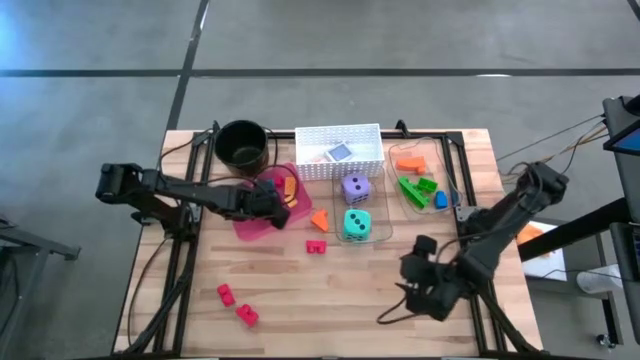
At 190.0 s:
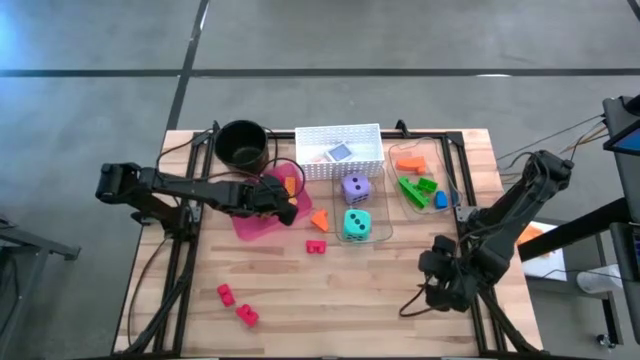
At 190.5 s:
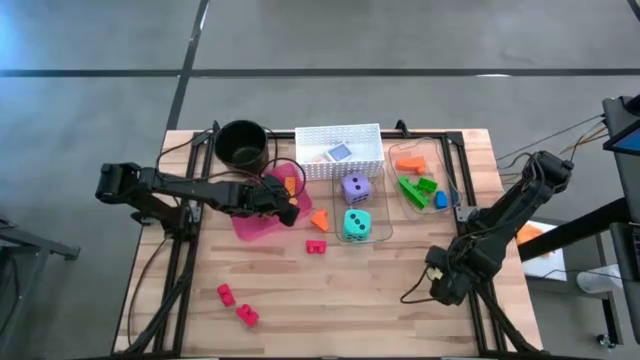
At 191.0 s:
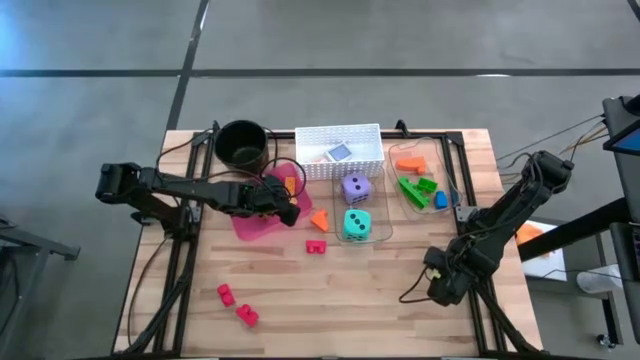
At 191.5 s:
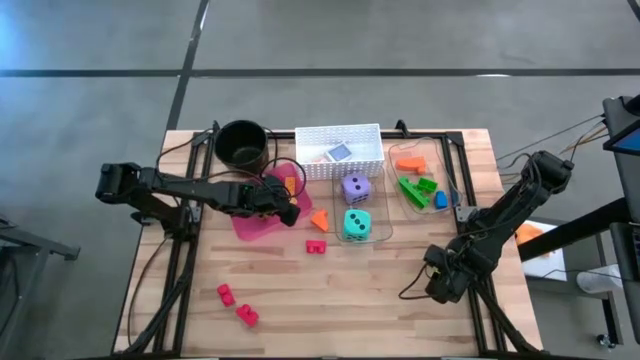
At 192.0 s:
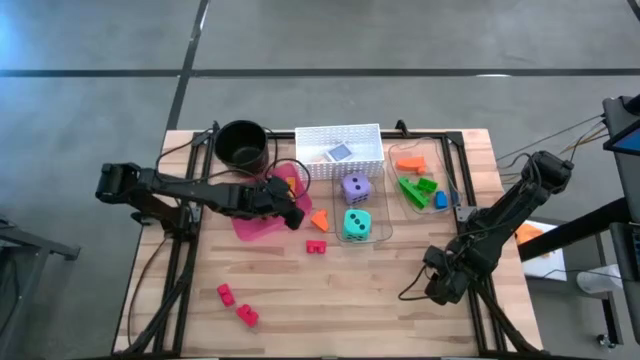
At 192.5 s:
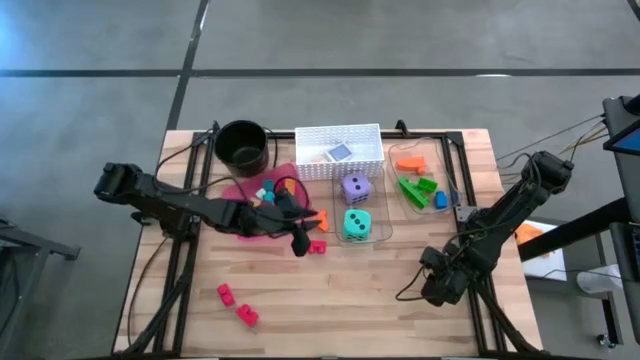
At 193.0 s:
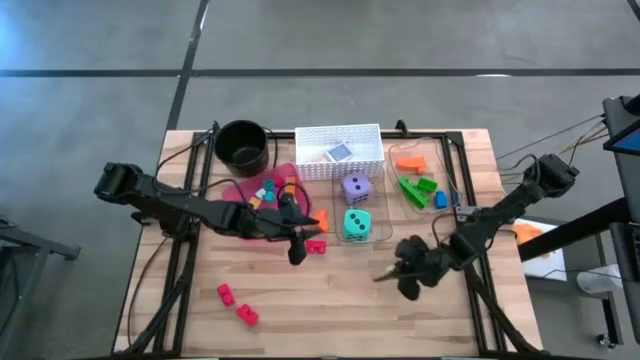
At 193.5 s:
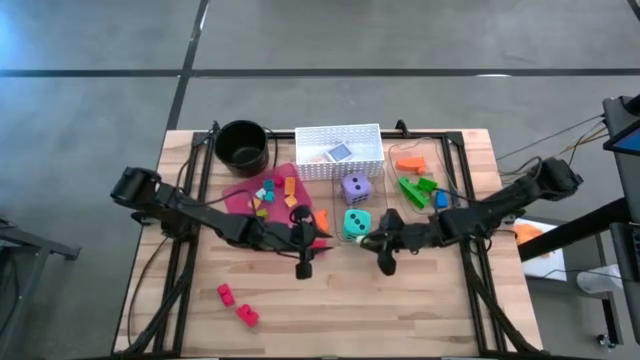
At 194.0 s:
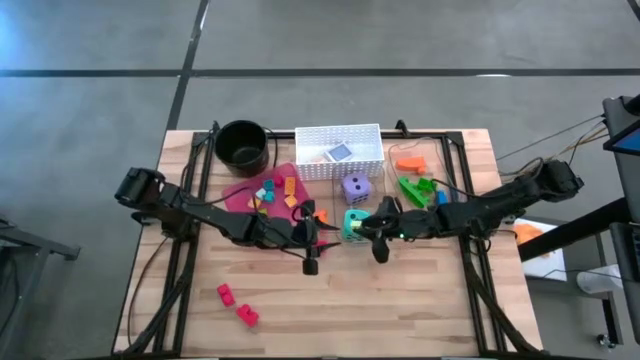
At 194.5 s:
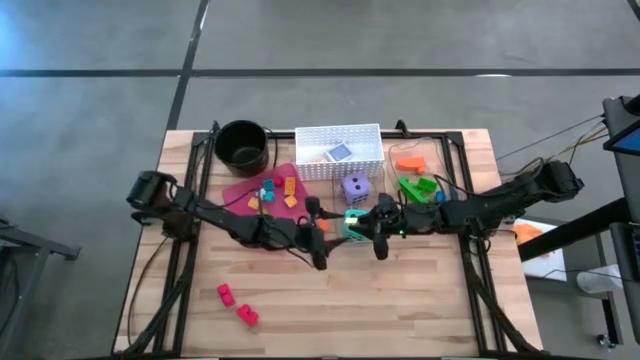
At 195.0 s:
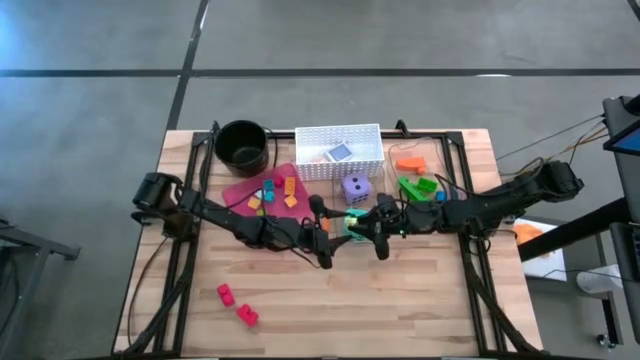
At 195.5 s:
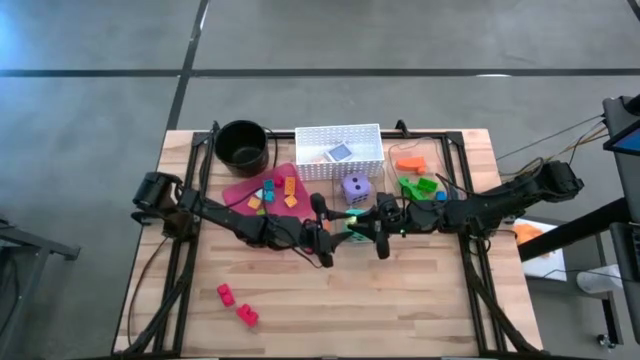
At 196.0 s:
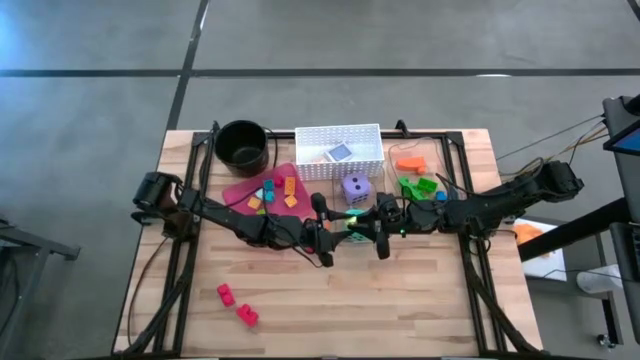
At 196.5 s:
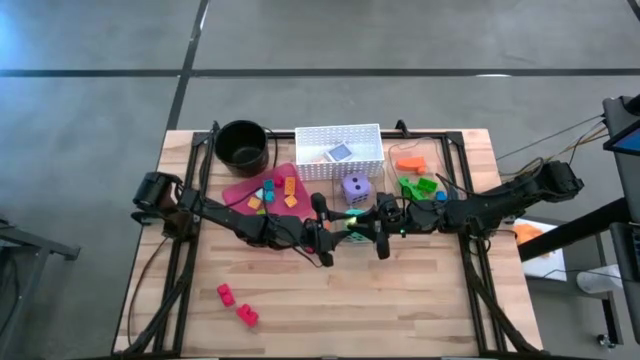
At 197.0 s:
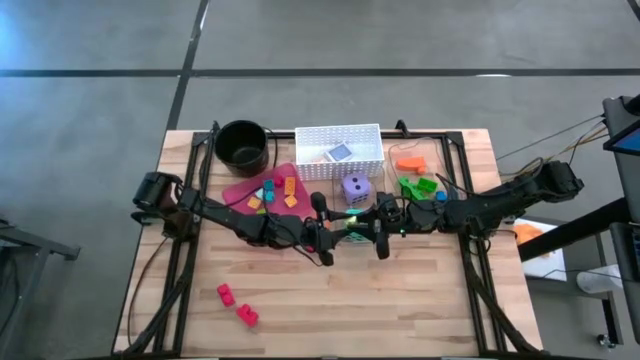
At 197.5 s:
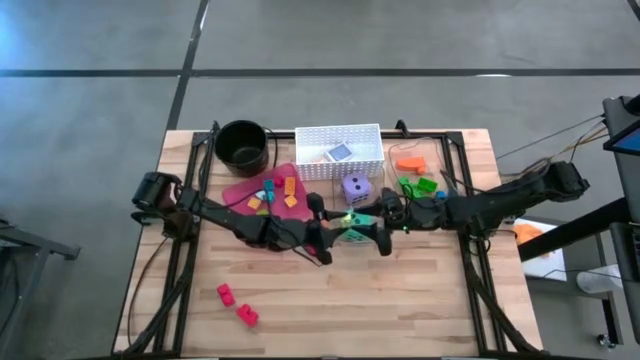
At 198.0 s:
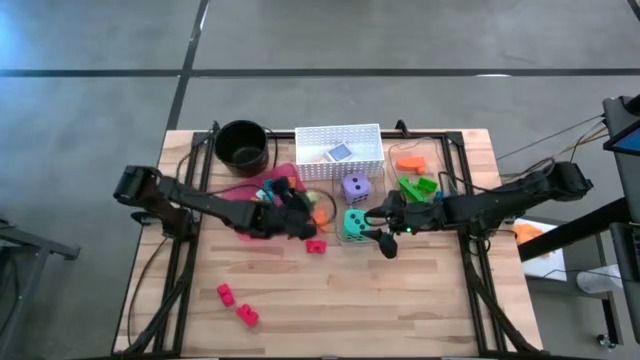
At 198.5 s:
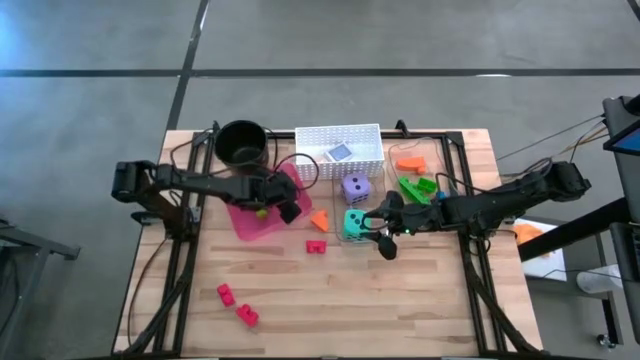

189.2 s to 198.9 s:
Task: Pick & Place Toys
Put the light green game piece into the transparent bin

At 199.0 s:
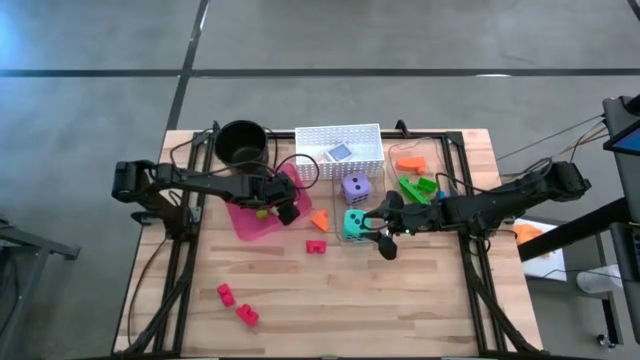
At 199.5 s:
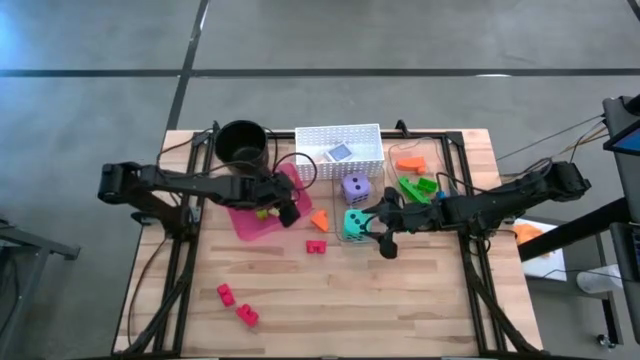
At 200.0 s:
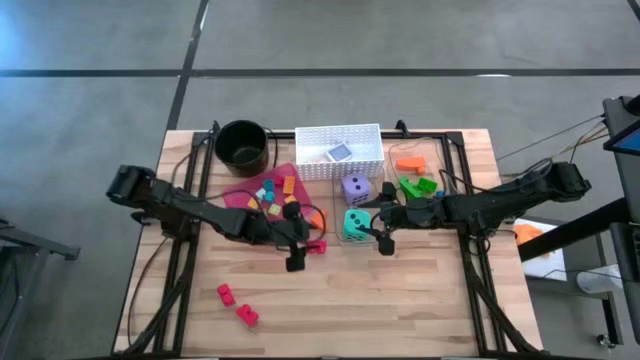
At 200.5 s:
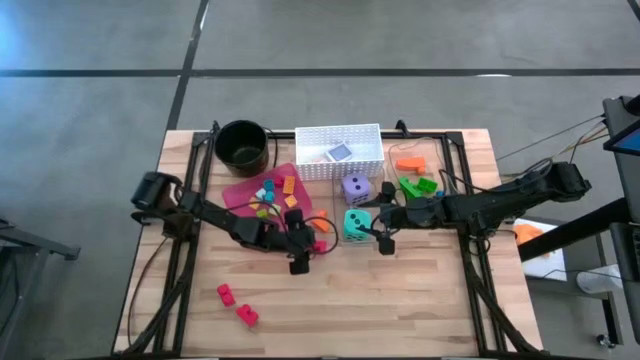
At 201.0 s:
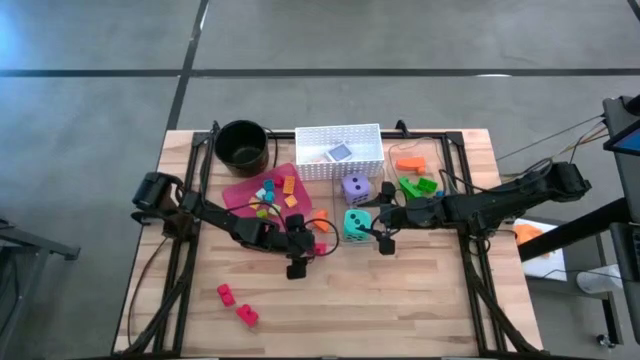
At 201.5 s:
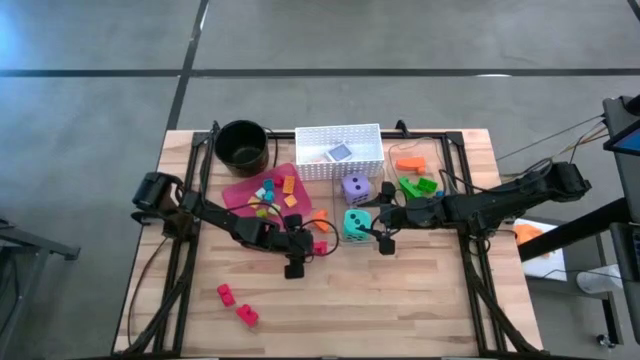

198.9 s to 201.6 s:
Put the top large red game piece into the top transparent bin

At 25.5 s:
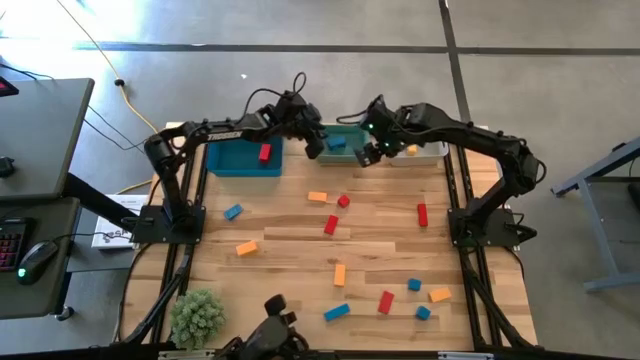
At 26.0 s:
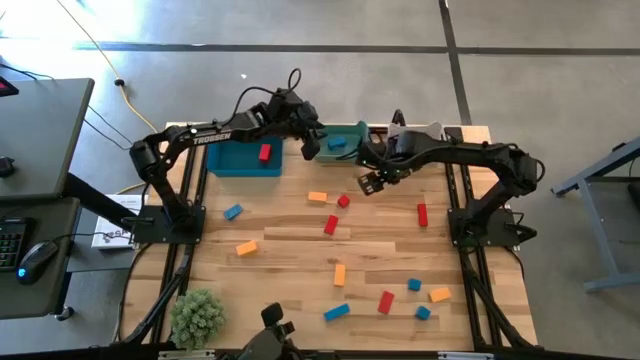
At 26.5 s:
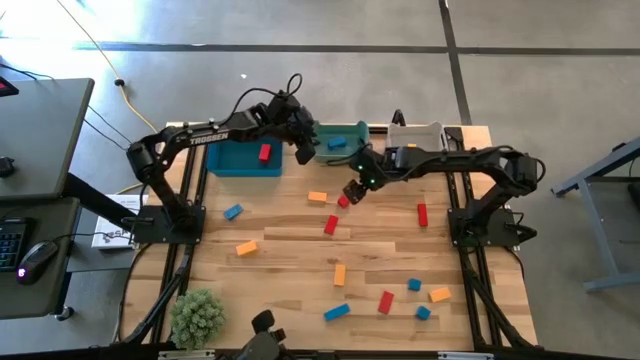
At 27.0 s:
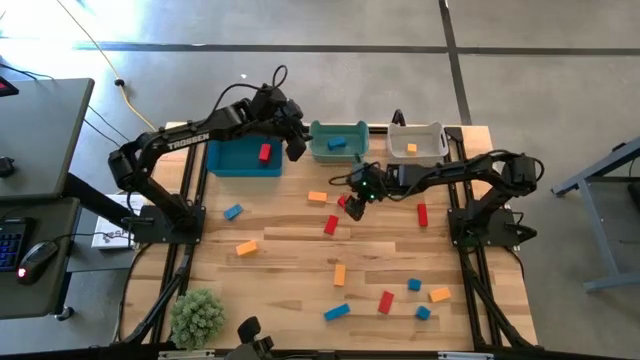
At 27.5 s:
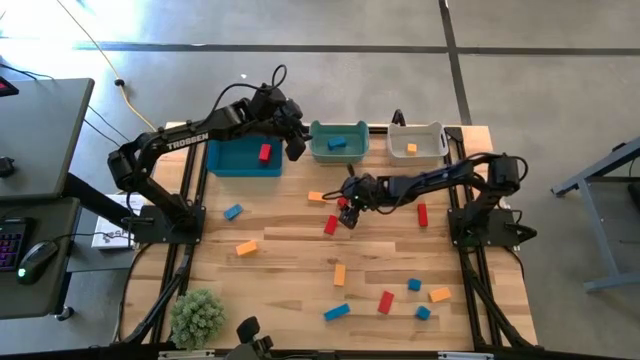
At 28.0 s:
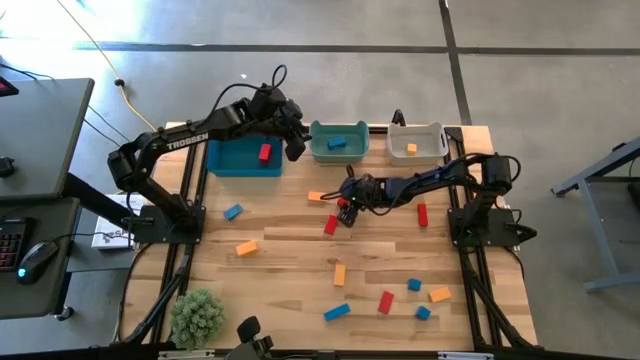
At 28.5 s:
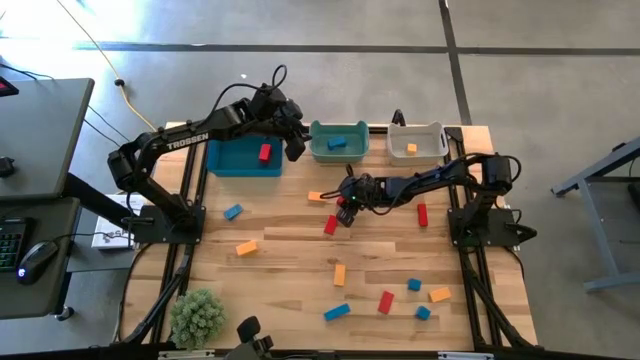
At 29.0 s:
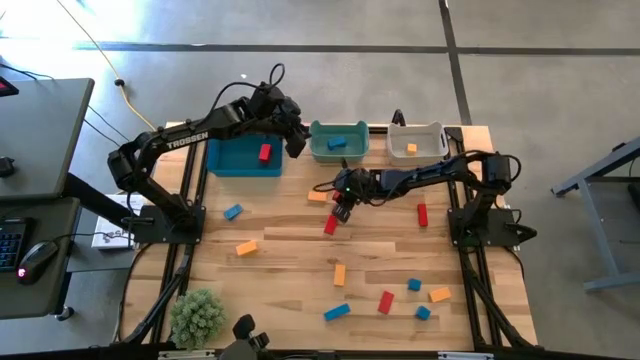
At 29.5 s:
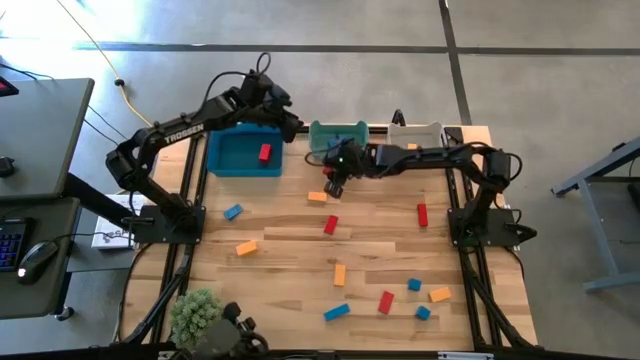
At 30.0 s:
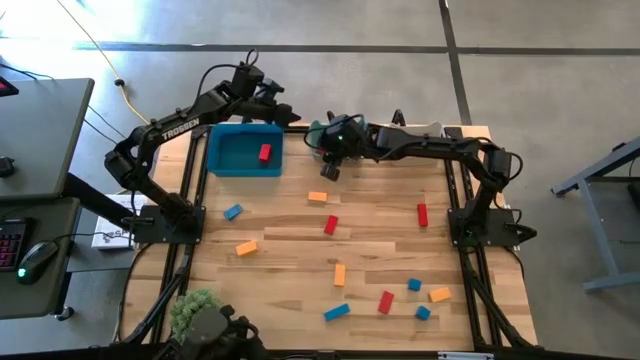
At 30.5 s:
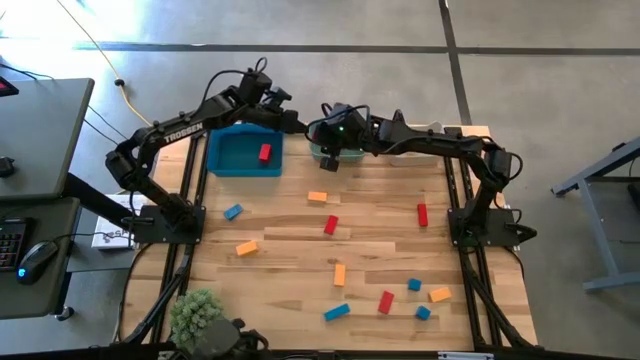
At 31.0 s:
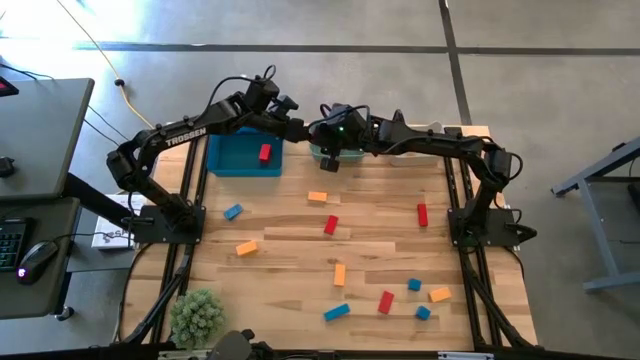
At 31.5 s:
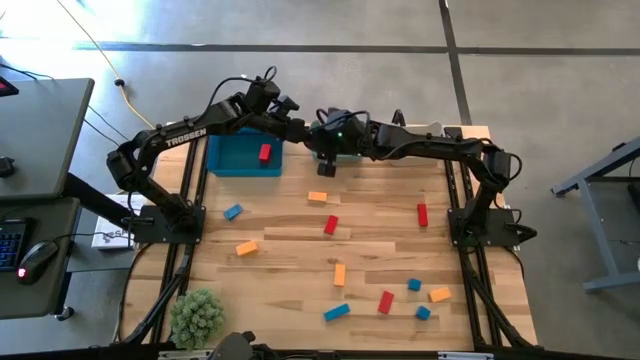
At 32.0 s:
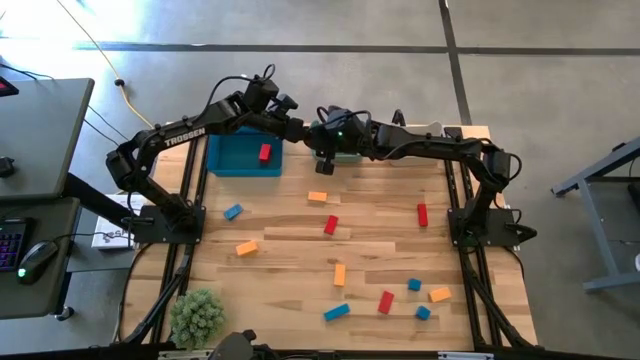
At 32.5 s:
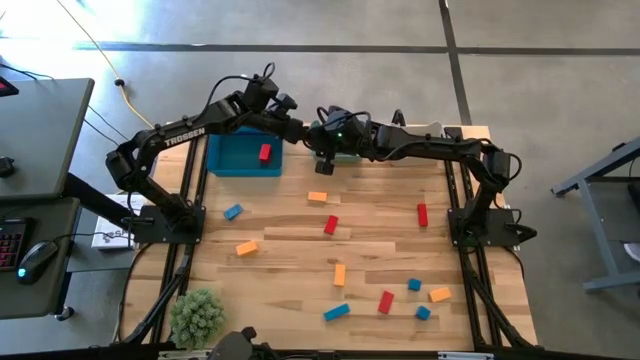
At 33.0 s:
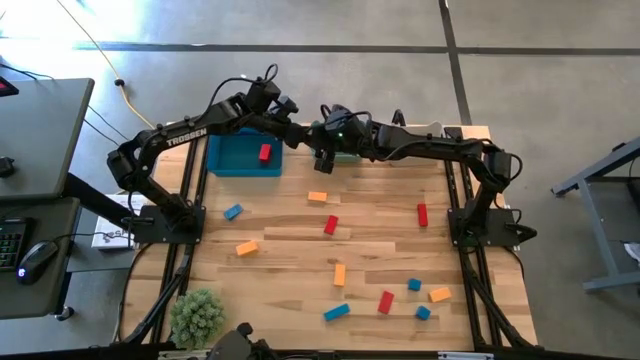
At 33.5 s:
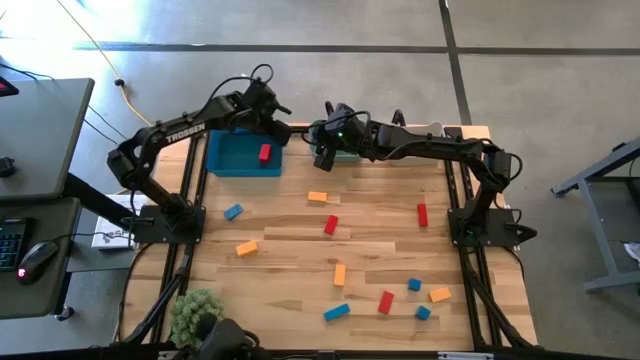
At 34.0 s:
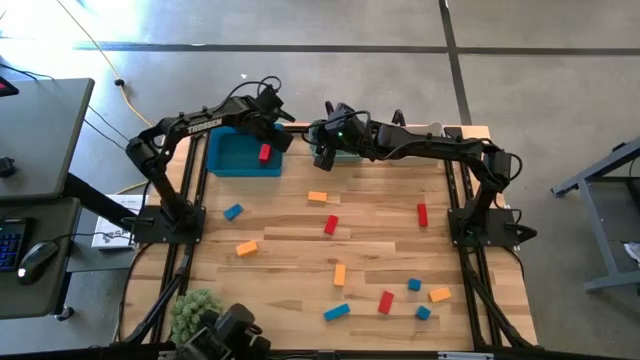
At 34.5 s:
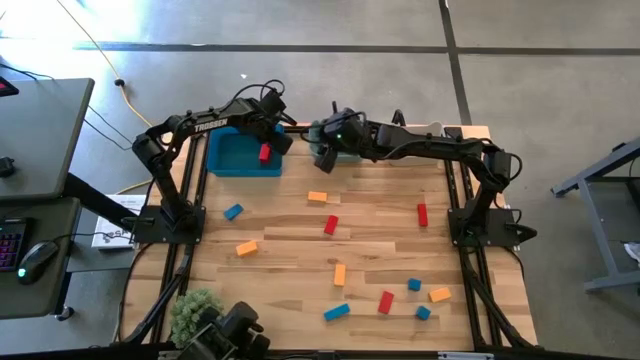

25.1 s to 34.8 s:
Task: Sort & place blocks by color
Put the red block into the blue bin
